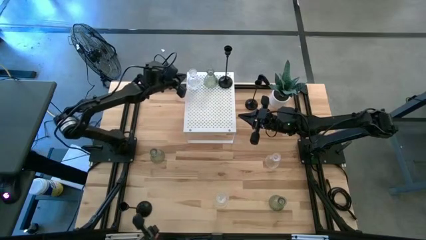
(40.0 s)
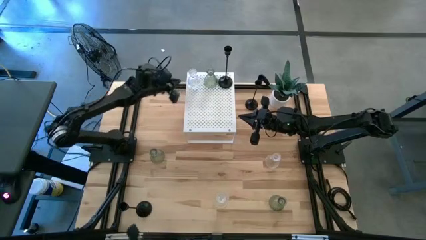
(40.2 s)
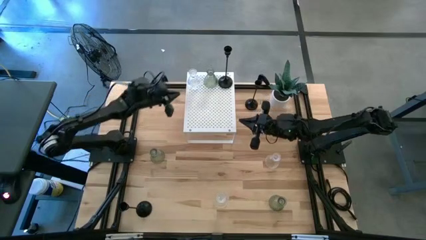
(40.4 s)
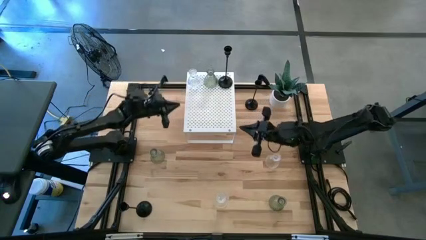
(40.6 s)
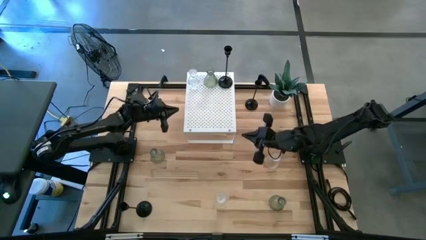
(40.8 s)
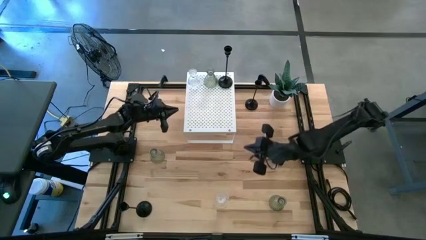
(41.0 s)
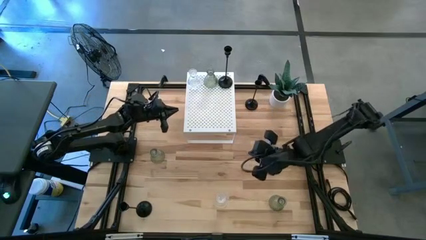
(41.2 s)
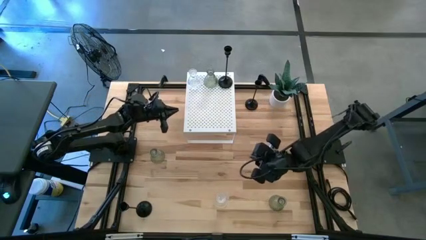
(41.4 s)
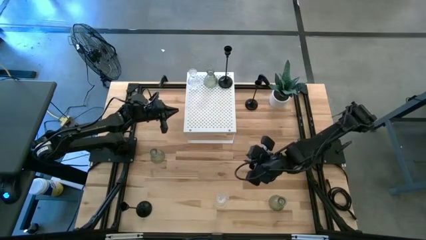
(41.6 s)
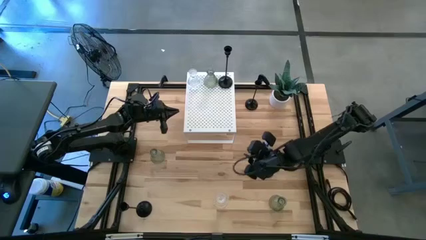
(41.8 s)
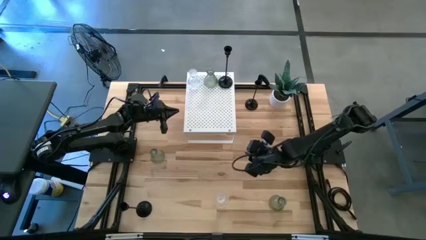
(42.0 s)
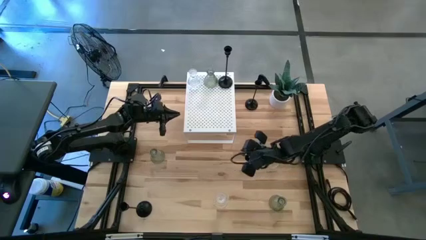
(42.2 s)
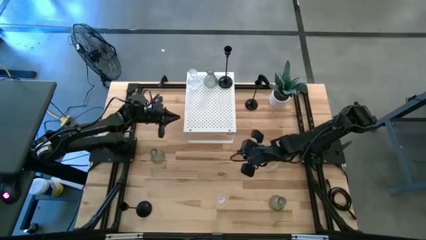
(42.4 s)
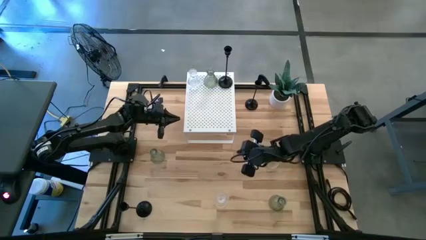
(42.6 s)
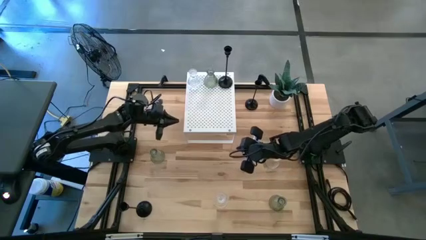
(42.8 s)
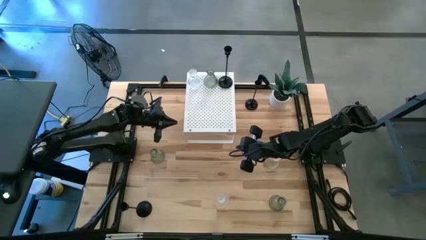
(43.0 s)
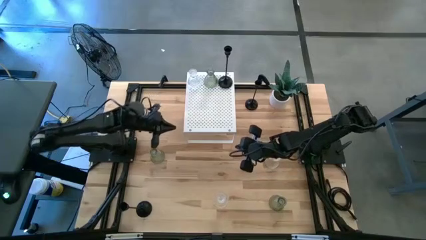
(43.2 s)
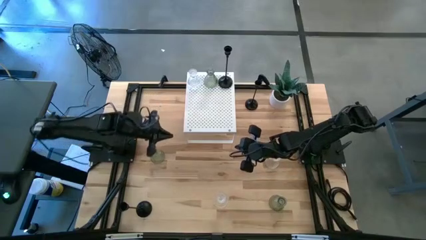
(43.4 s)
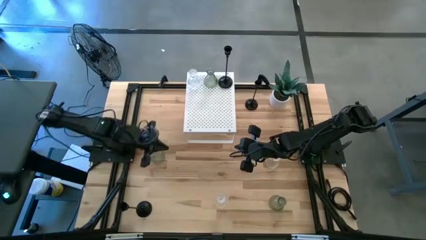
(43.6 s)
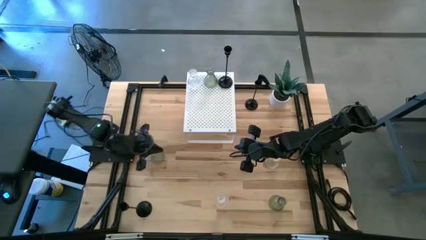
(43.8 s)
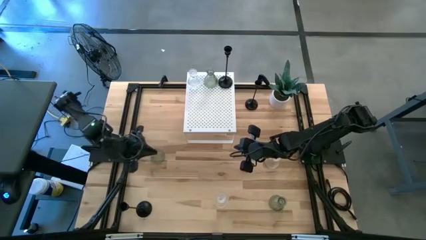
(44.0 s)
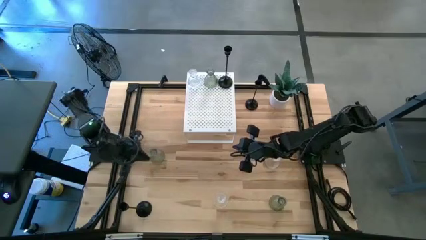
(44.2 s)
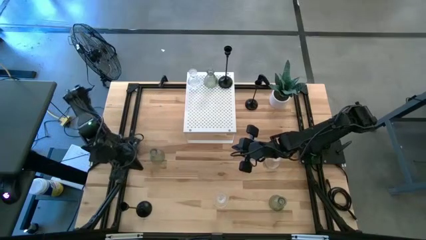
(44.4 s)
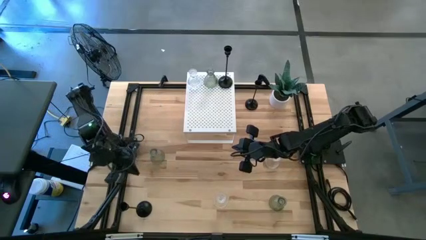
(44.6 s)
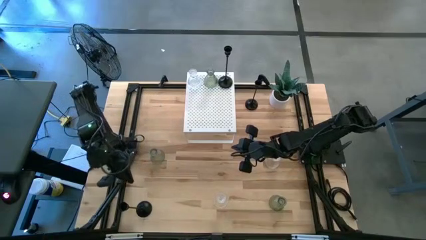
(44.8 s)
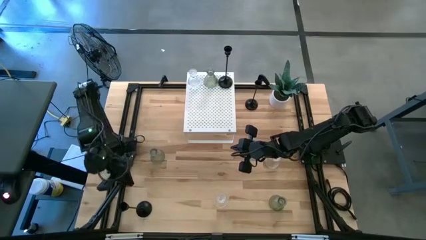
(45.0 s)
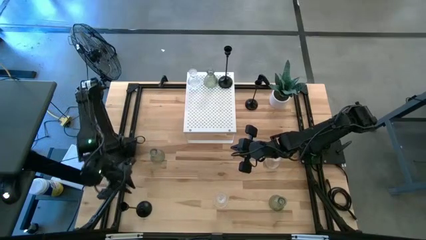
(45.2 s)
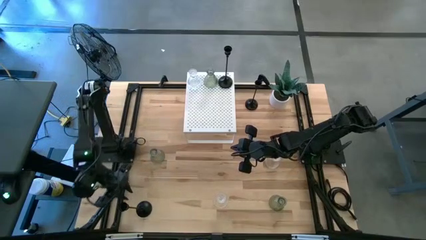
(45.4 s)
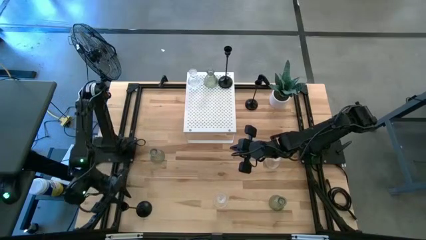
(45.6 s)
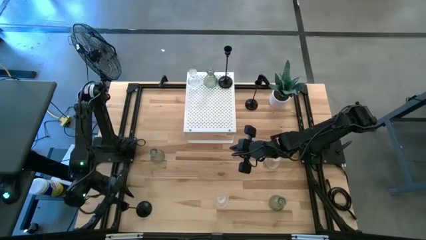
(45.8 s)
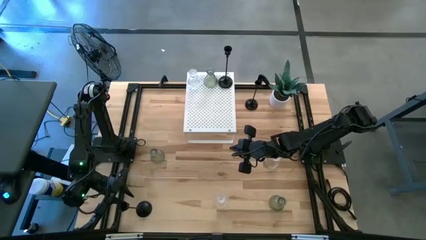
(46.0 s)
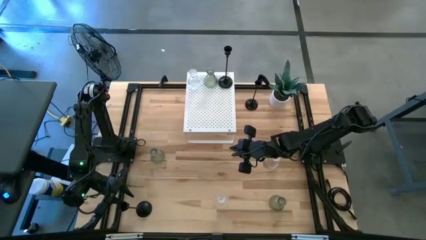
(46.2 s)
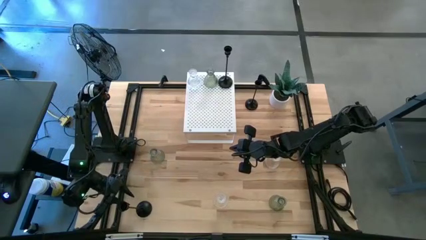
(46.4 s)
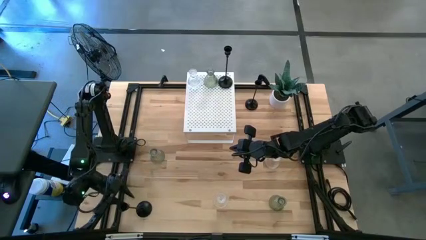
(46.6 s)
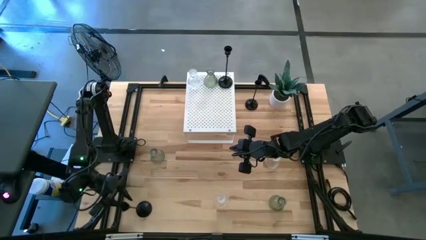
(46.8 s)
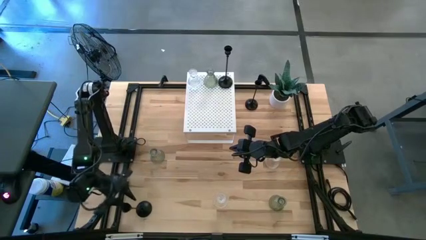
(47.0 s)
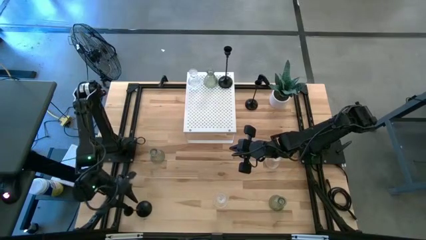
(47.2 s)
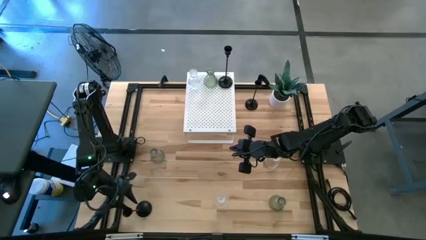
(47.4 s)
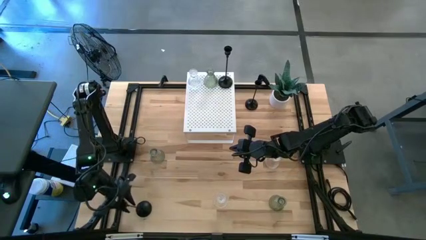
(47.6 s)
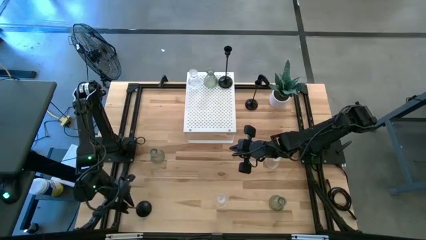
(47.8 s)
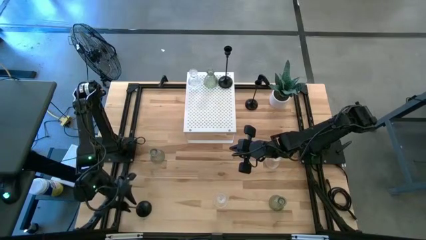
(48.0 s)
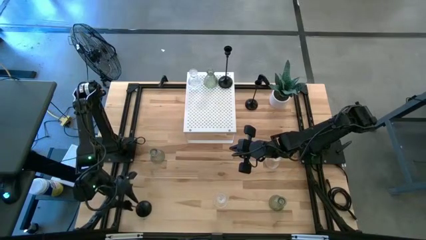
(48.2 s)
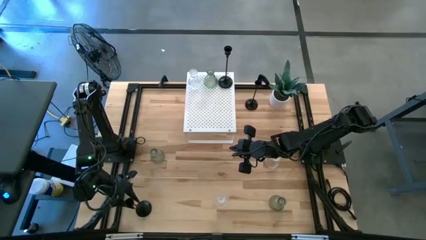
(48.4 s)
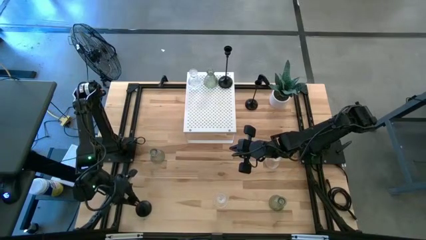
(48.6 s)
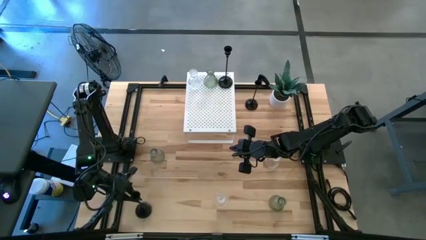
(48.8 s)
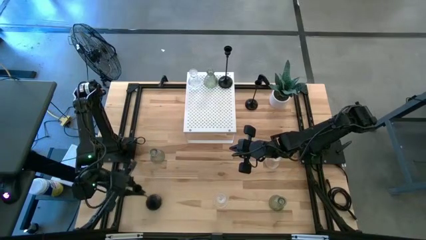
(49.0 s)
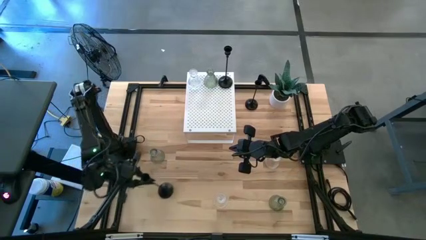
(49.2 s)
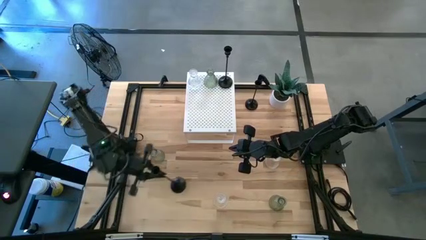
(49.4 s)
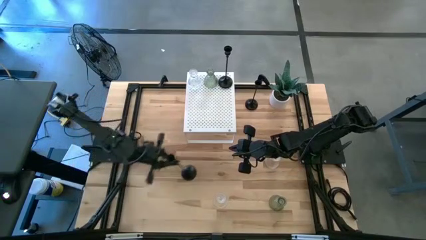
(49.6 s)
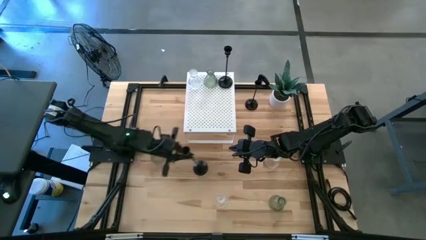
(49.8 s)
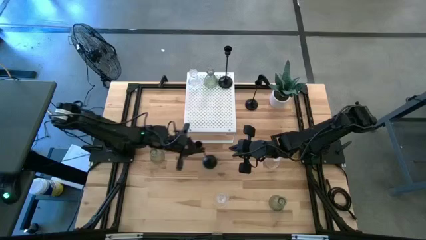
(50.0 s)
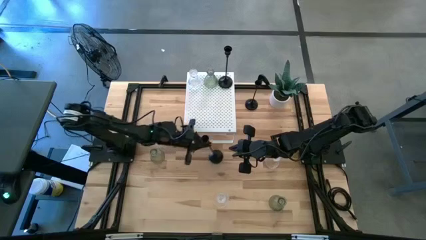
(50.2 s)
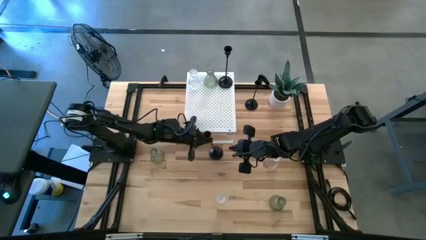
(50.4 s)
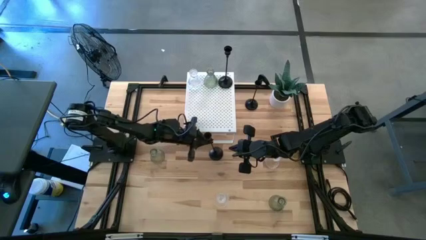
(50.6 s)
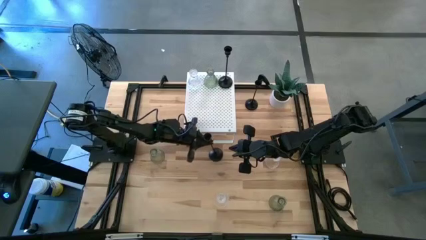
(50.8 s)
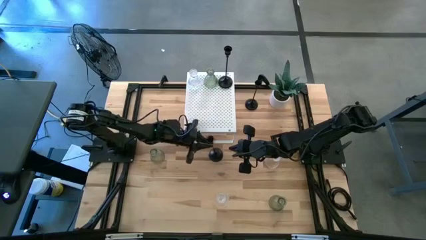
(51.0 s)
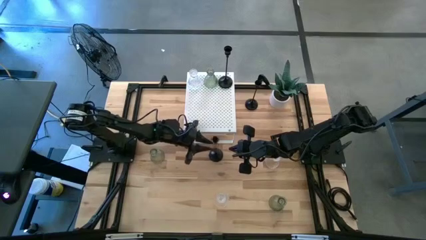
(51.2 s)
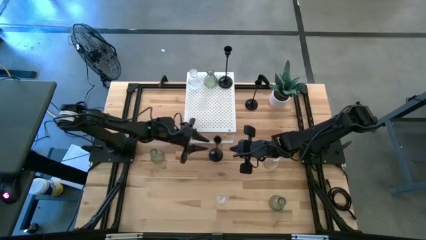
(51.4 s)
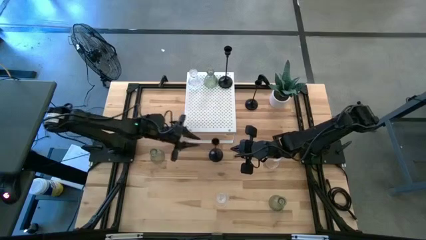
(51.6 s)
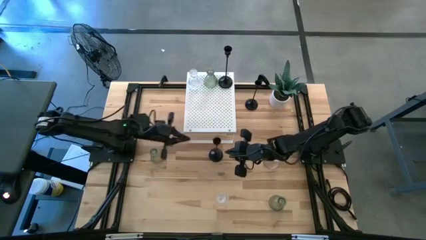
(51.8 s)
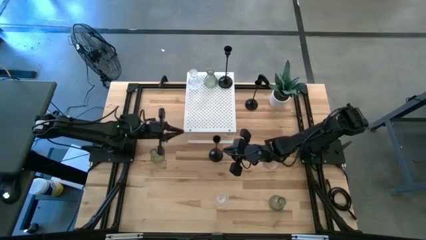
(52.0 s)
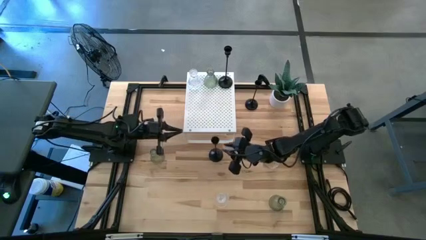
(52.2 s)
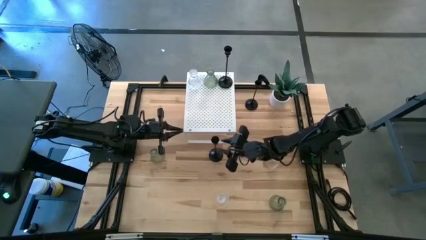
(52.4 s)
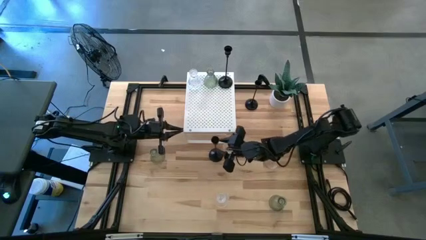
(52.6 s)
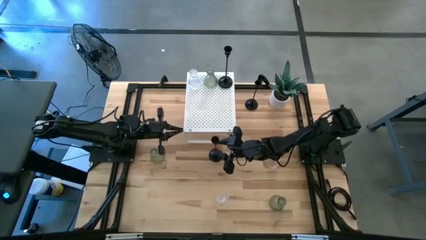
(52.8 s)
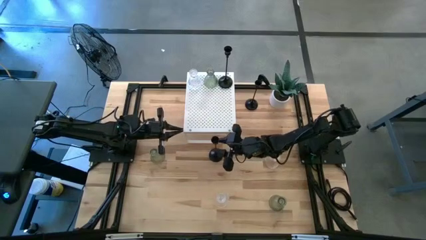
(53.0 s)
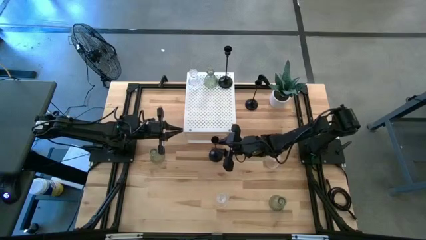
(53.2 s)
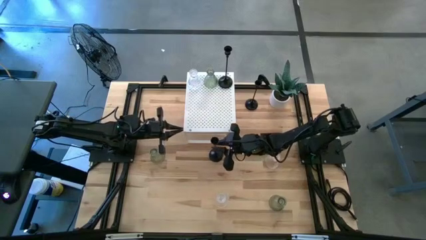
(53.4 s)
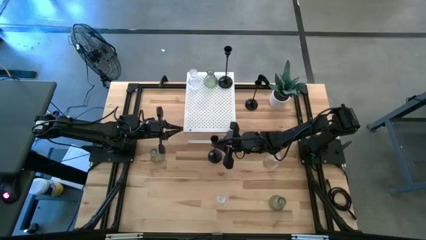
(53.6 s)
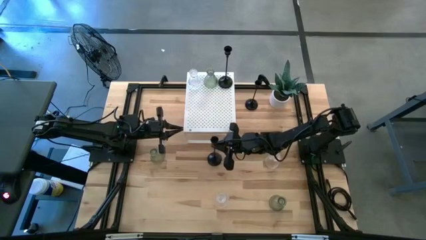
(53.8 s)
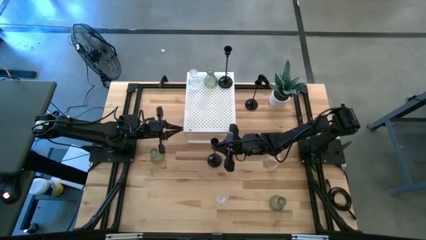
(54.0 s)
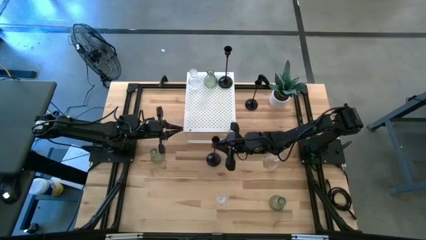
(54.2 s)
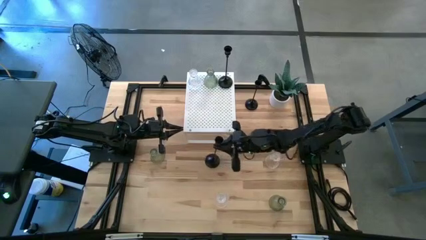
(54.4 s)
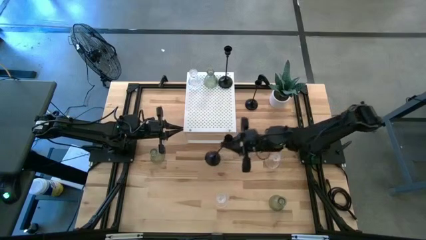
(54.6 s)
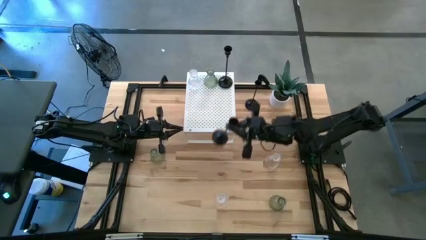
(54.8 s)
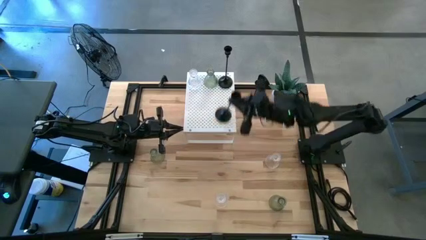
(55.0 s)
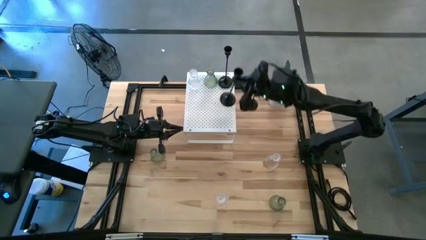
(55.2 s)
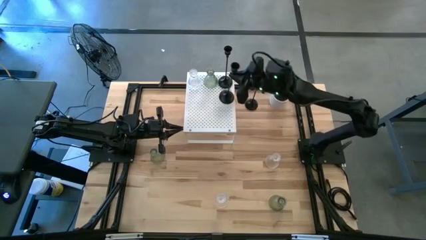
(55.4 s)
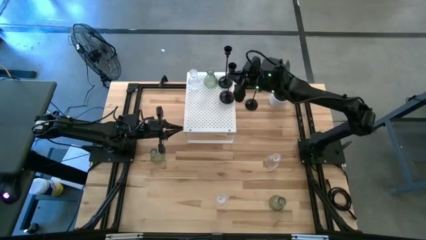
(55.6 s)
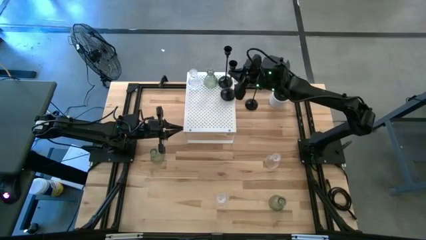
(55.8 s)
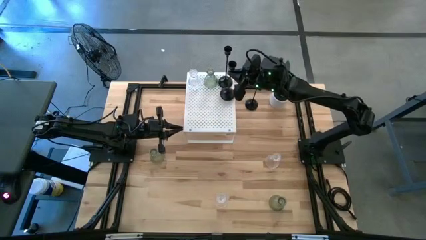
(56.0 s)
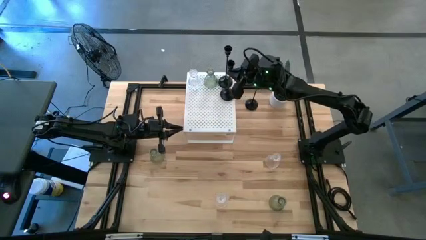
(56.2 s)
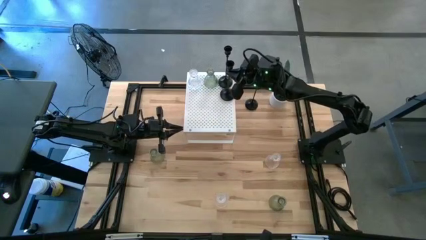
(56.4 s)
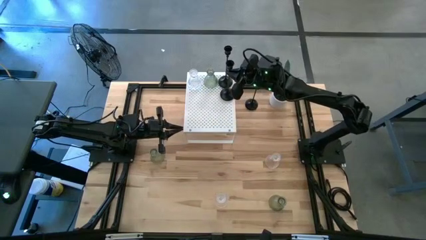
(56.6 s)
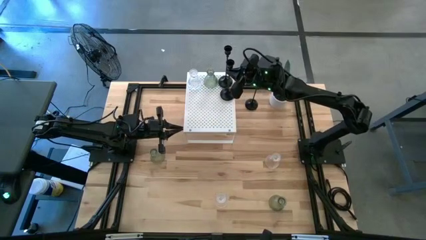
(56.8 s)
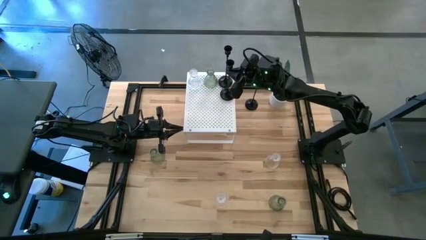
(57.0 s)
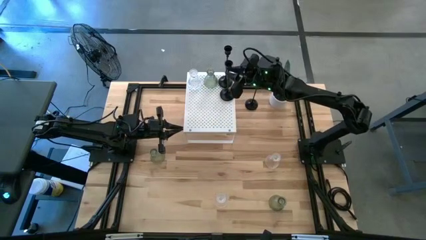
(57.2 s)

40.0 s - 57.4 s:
Task: Pick & Place candle stick holders
Put the bottom black candle holder on the shelf aligned with the other black candle holder
